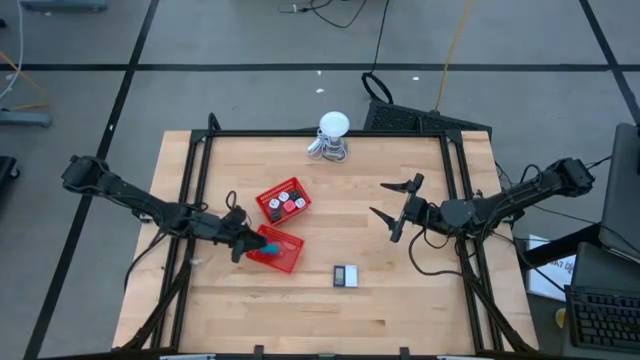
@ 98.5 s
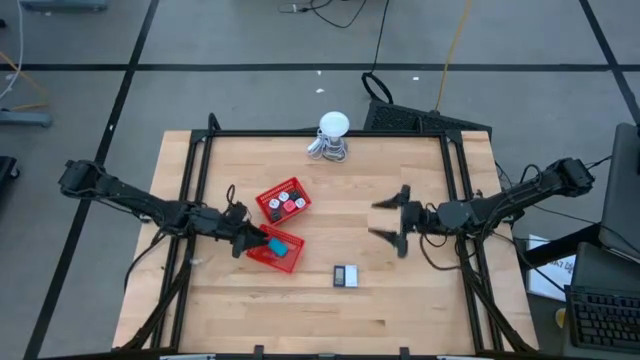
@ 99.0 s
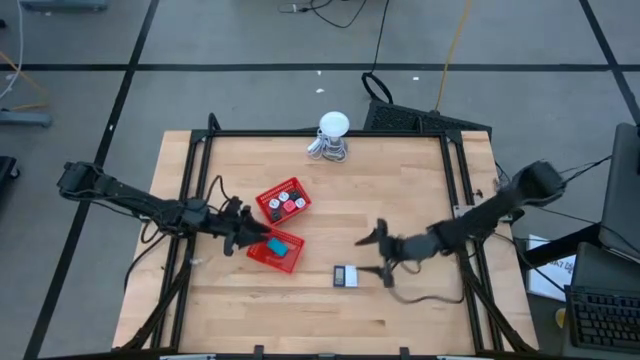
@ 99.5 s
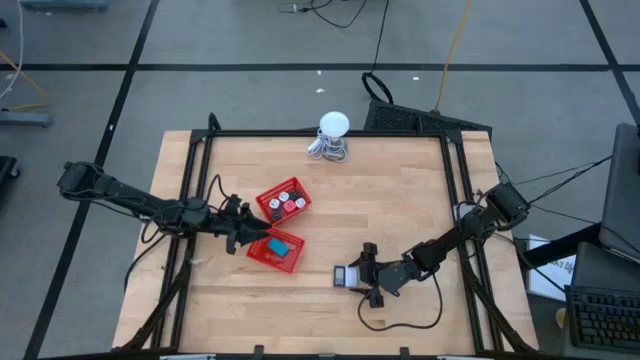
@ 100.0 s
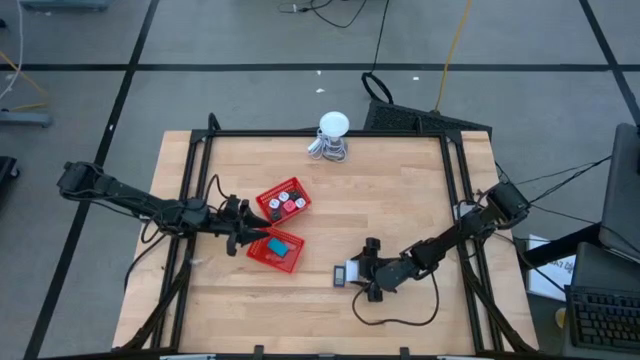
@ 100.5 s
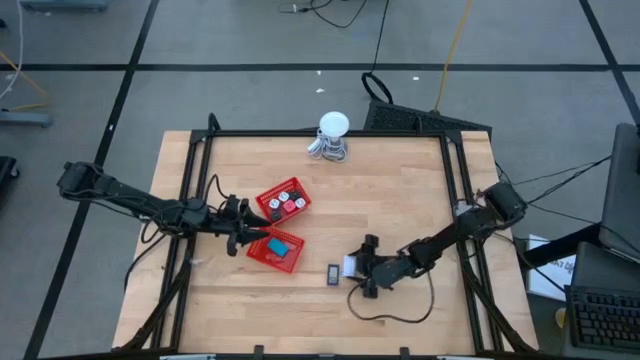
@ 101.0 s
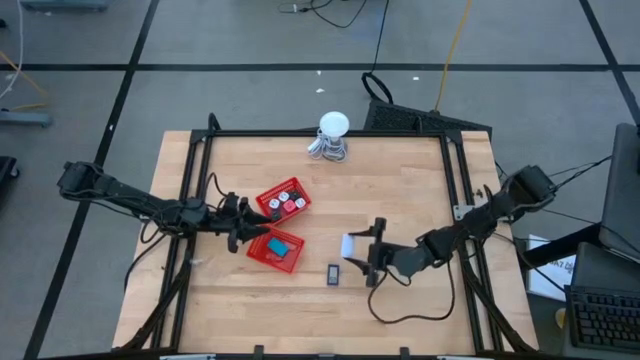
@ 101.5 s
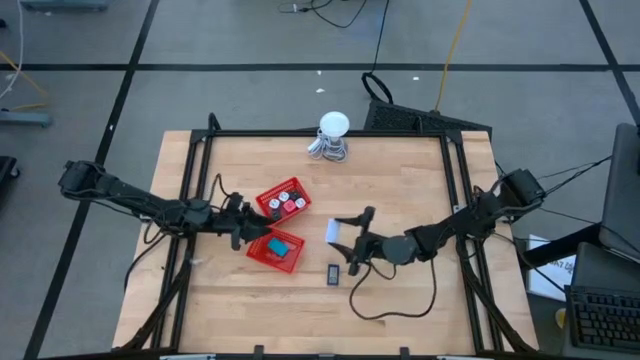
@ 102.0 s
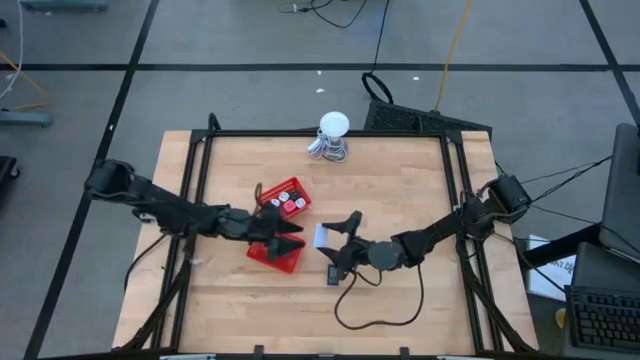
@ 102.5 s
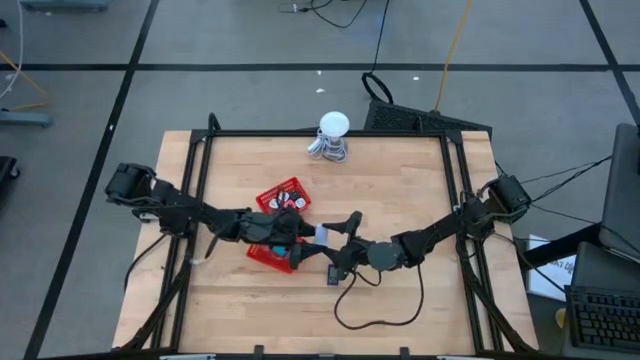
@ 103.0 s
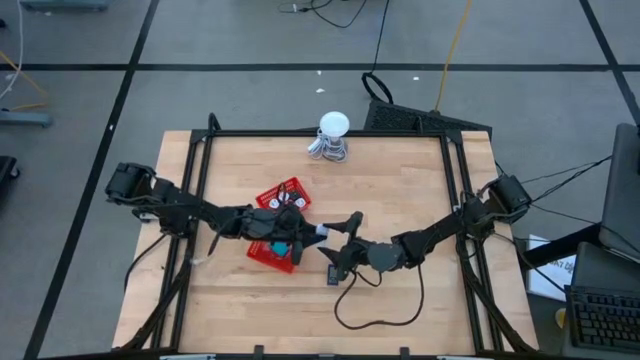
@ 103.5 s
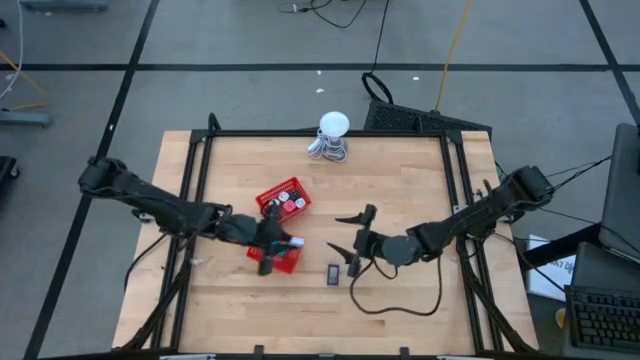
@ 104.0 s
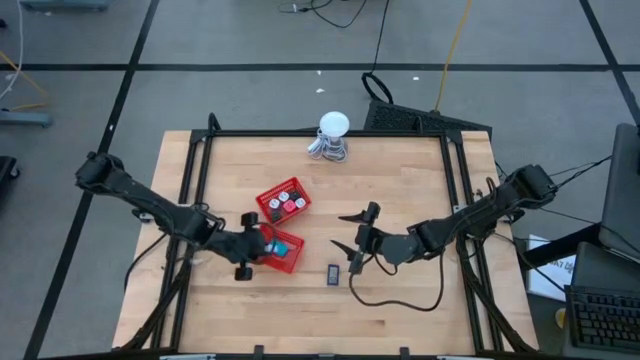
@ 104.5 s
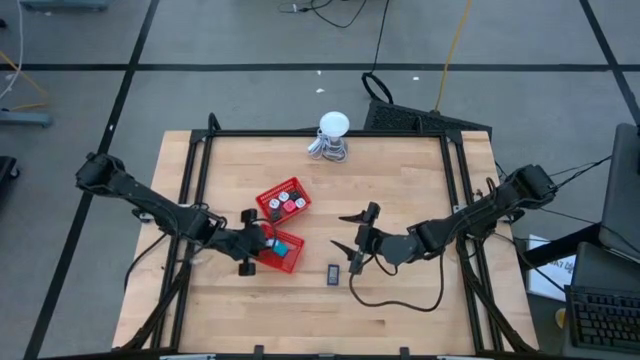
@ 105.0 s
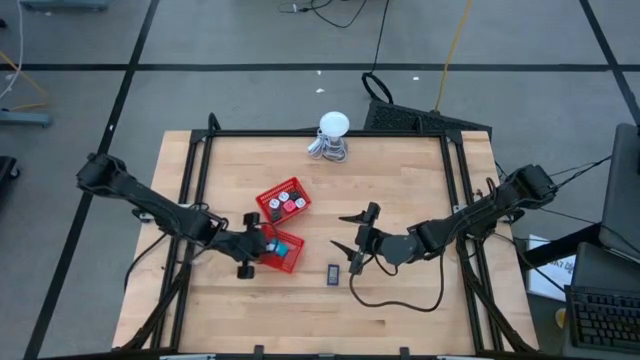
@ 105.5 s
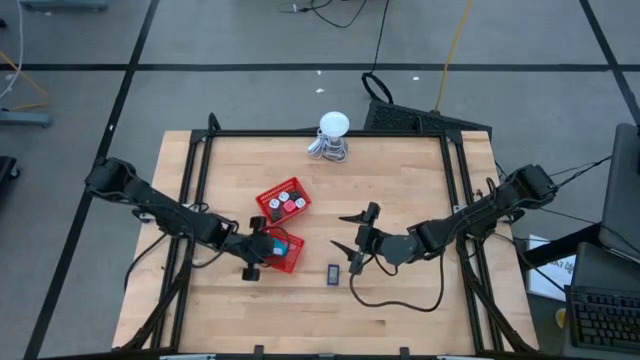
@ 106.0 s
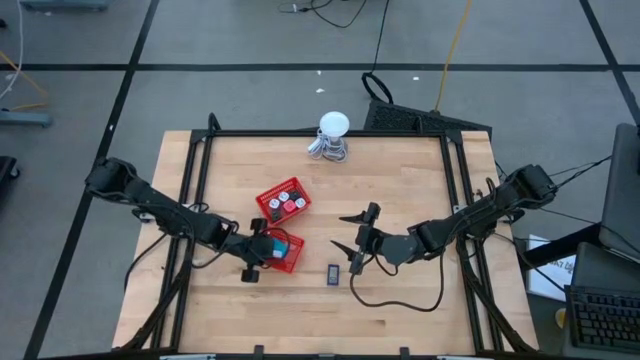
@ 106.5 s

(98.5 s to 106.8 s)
Task: Pick & Place Office items
Put the white digital clock into the bottom red basket

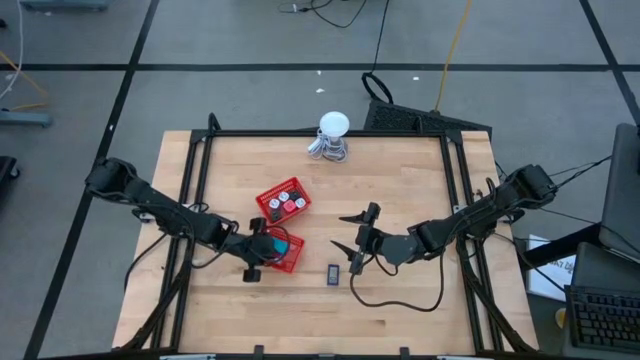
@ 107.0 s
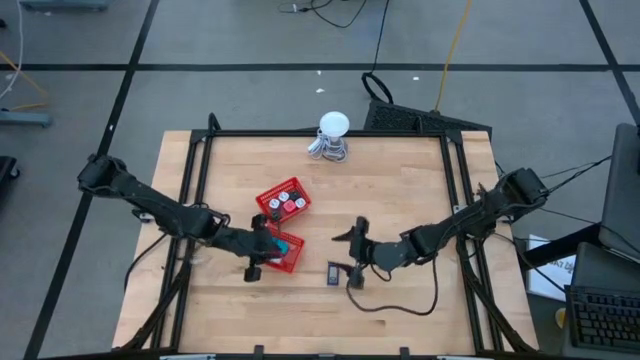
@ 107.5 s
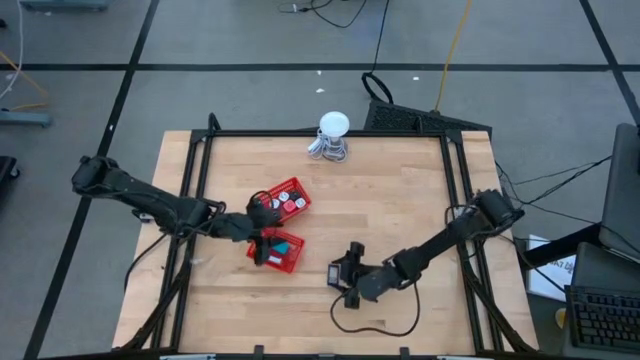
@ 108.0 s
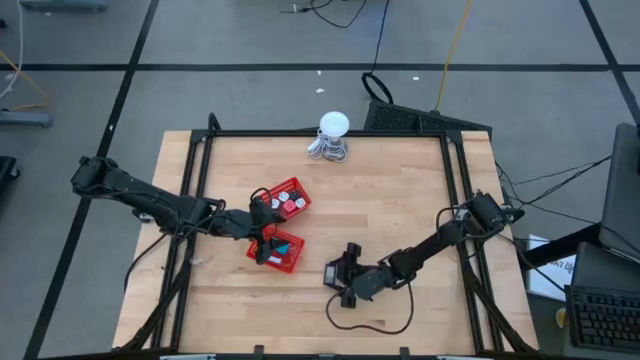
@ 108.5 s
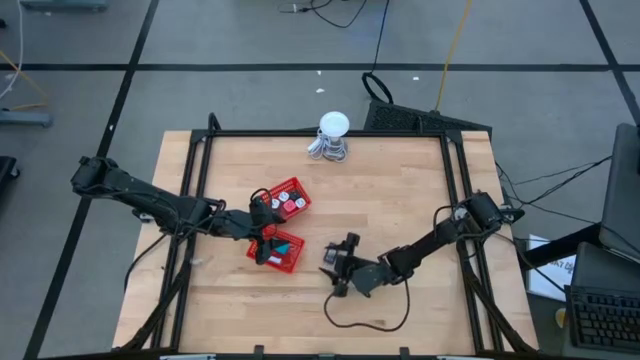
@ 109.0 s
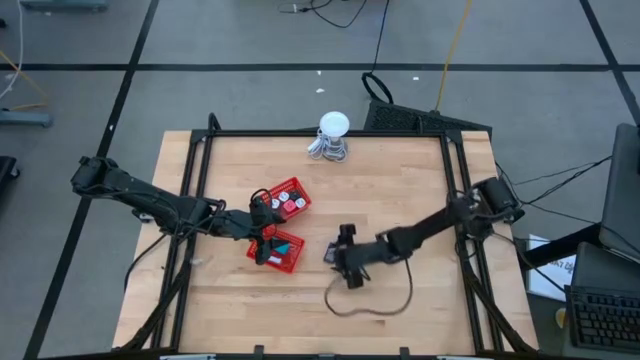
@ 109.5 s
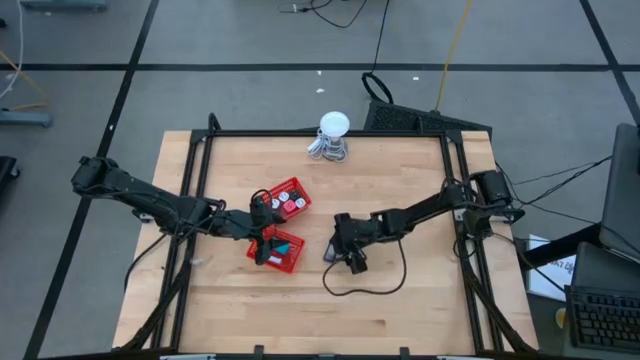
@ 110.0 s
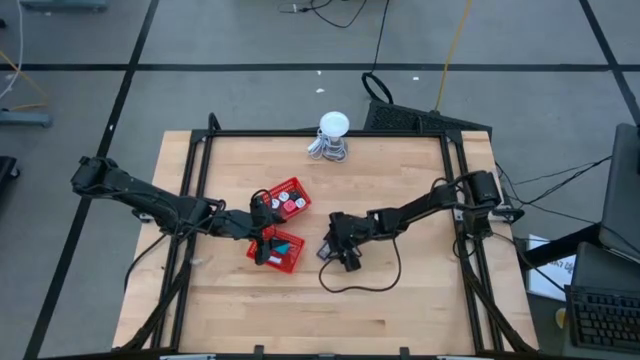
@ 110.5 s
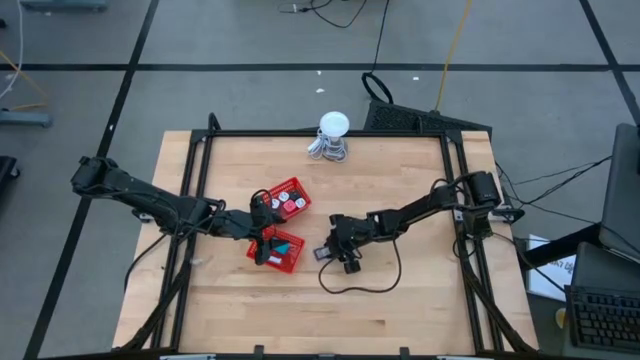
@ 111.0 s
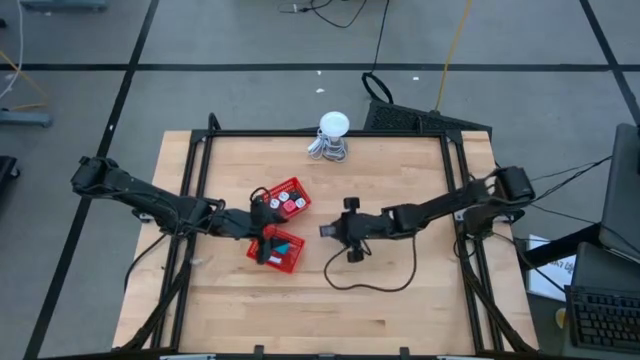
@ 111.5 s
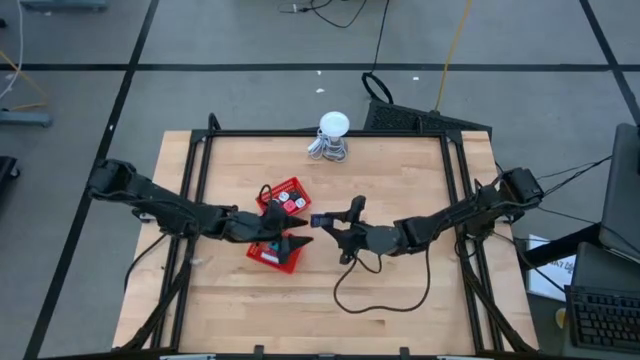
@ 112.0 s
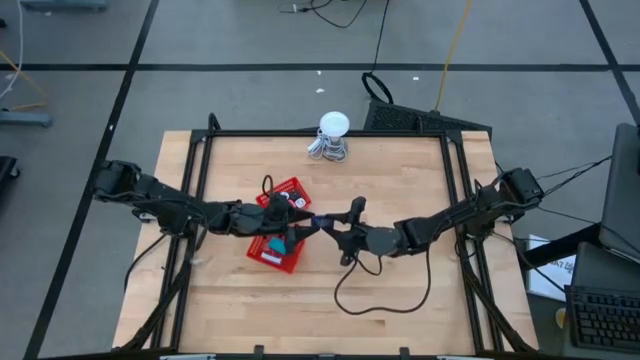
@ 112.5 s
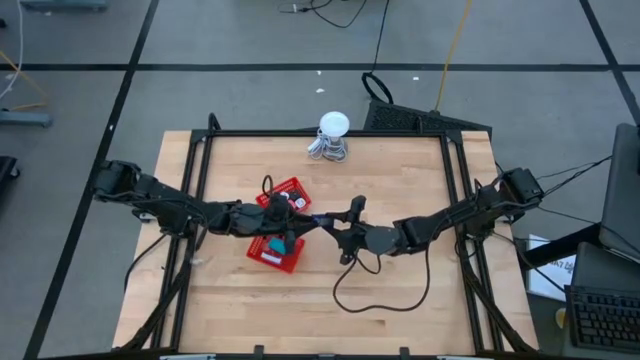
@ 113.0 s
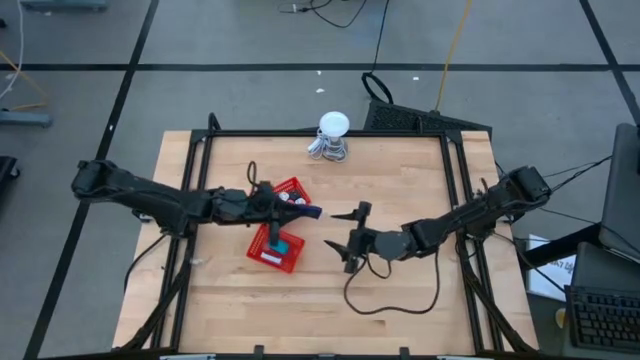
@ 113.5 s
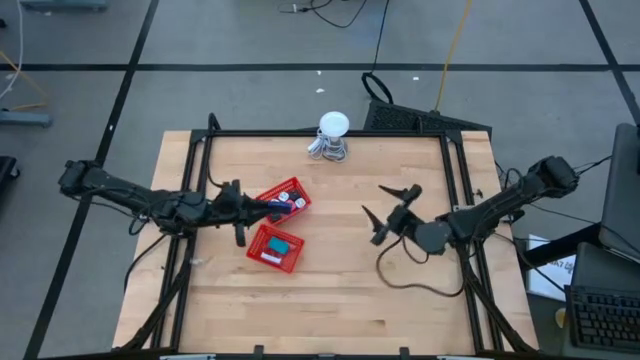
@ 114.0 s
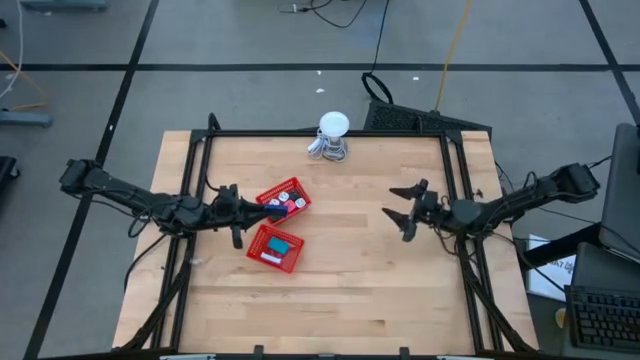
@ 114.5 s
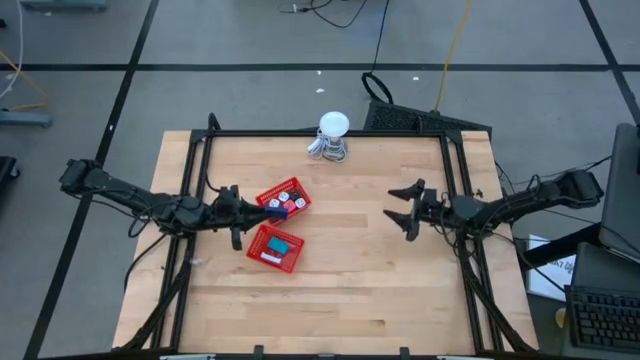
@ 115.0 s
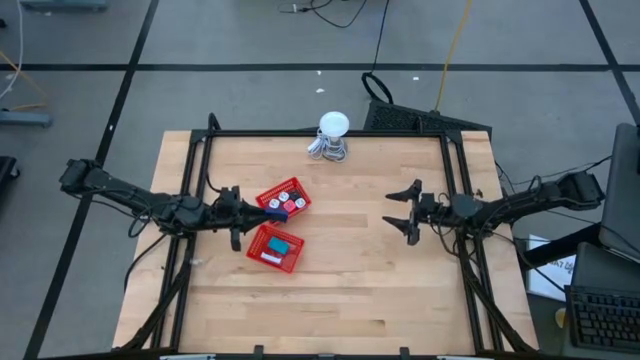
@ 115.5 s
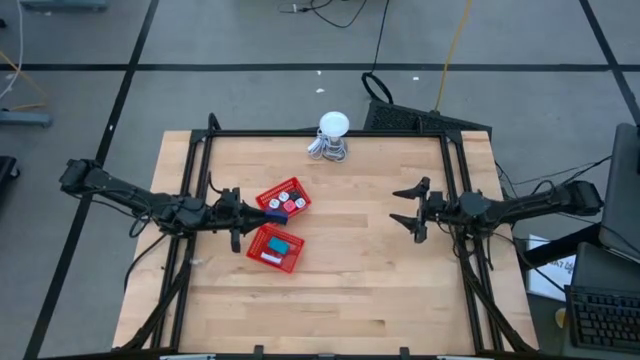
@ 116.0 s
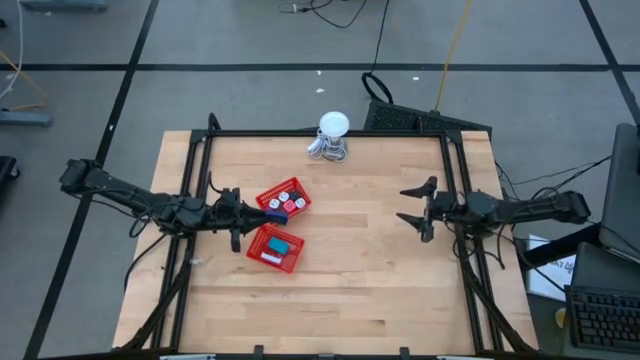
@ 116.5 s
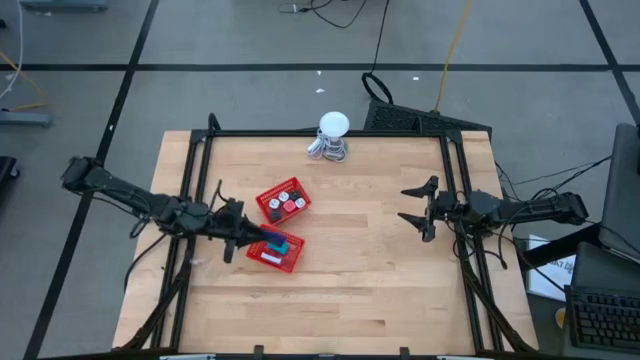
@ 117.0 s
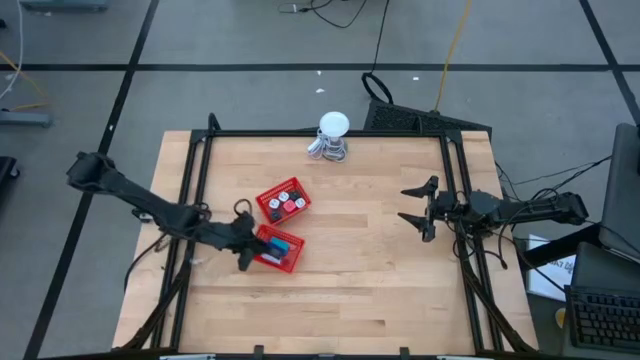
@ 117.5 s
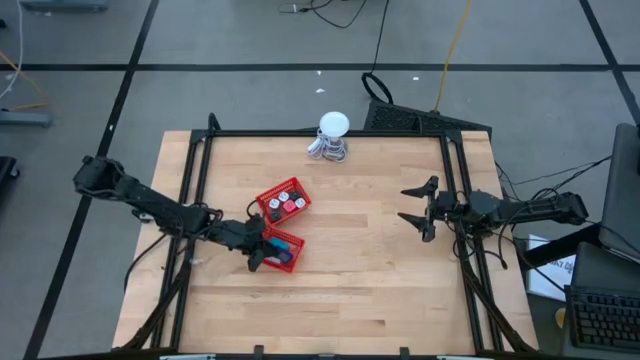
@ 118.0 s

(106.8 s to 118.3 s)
Put the dark blue digital clock into the bottom red basket
